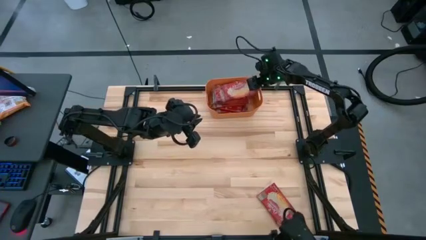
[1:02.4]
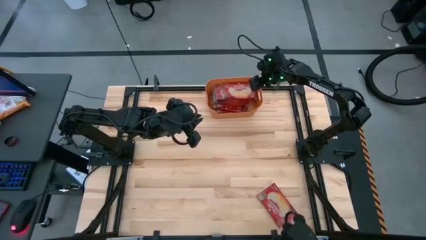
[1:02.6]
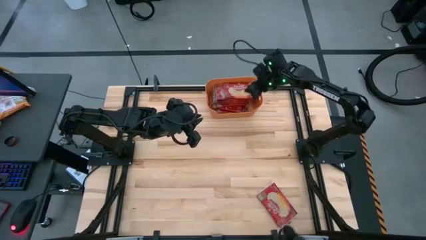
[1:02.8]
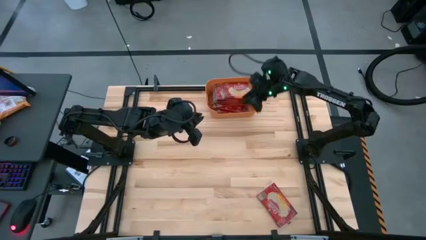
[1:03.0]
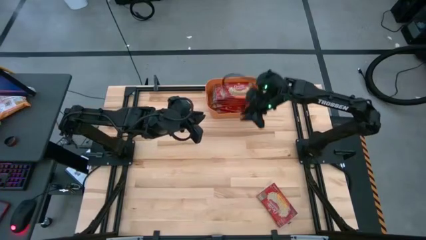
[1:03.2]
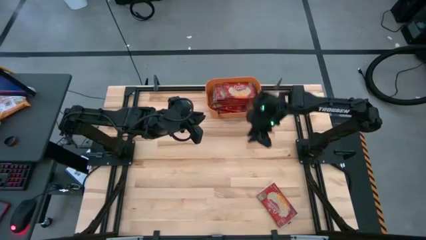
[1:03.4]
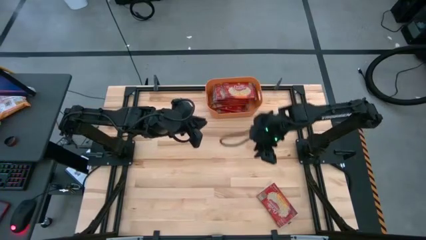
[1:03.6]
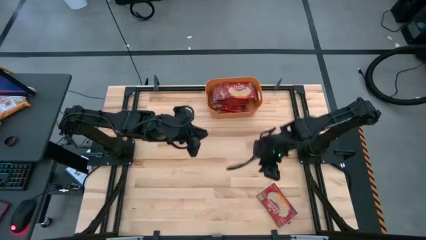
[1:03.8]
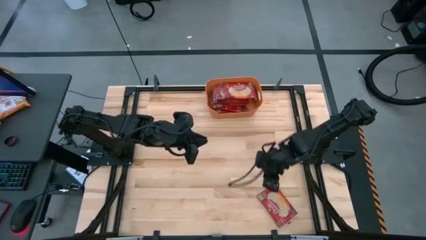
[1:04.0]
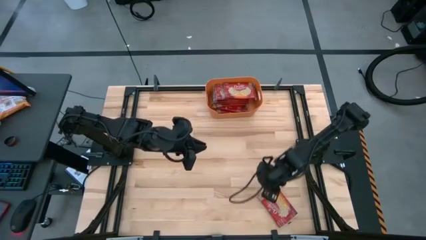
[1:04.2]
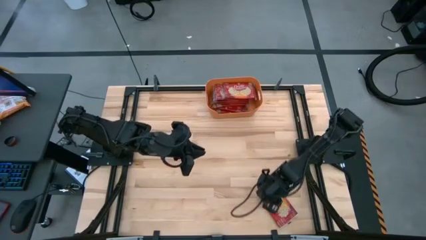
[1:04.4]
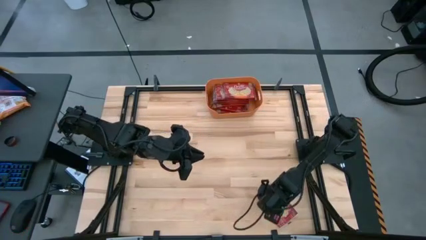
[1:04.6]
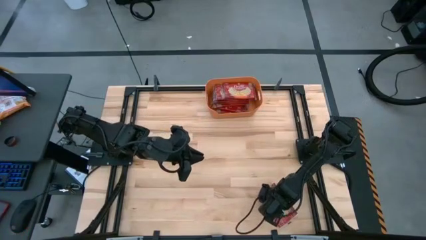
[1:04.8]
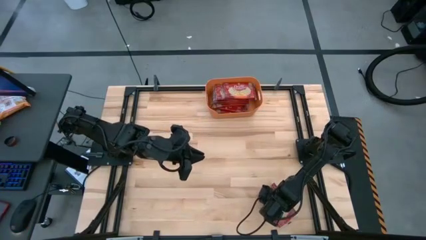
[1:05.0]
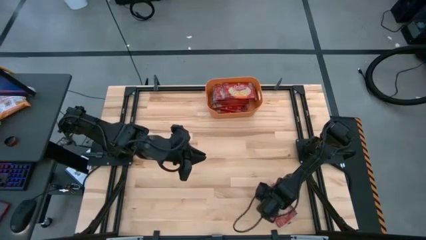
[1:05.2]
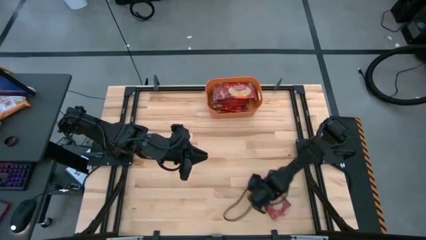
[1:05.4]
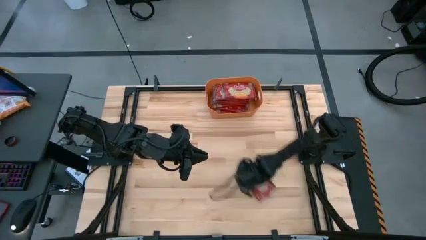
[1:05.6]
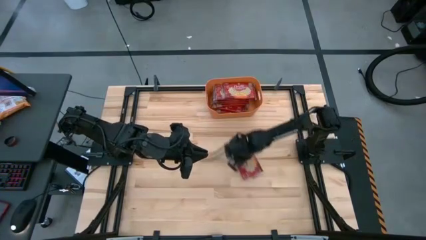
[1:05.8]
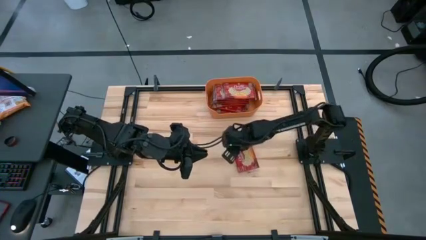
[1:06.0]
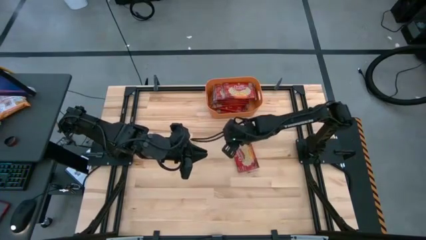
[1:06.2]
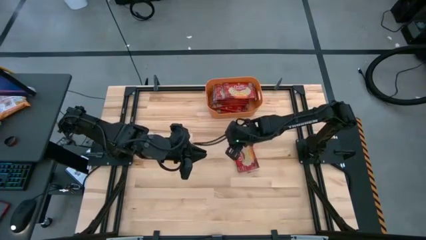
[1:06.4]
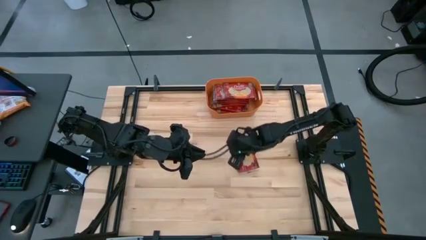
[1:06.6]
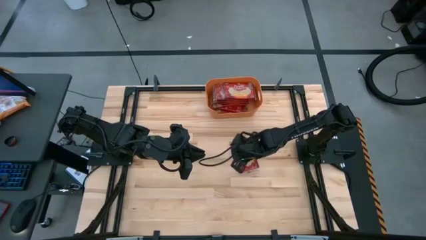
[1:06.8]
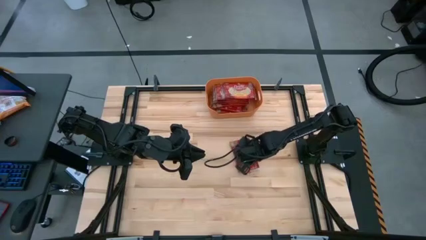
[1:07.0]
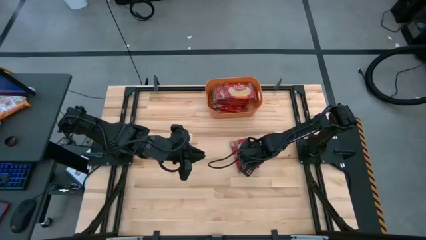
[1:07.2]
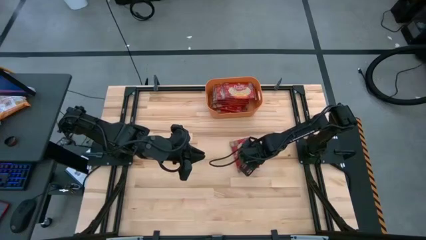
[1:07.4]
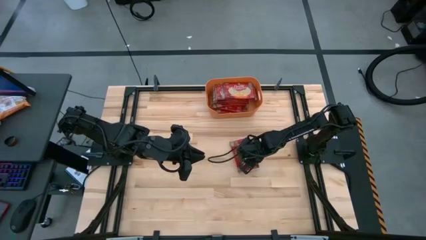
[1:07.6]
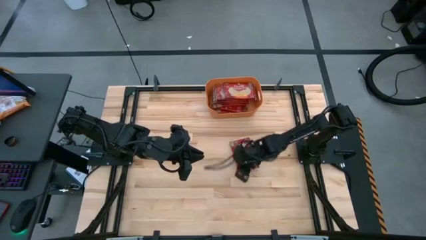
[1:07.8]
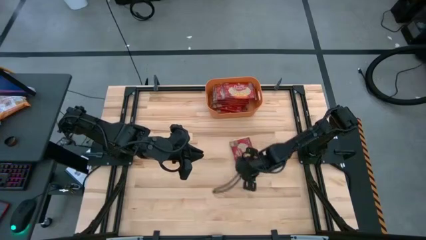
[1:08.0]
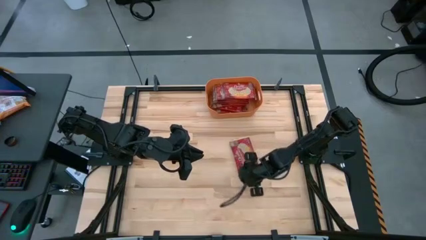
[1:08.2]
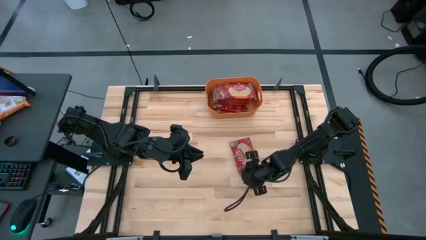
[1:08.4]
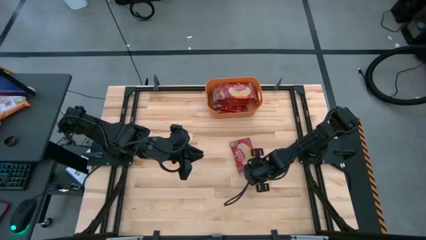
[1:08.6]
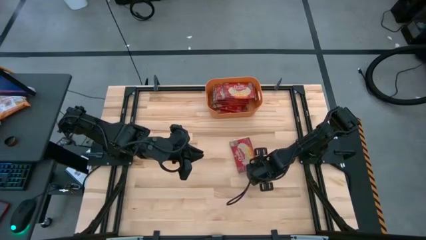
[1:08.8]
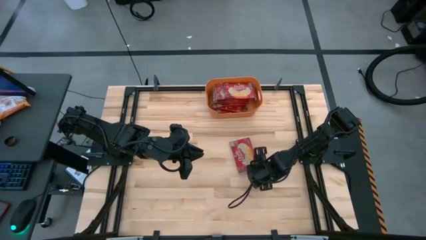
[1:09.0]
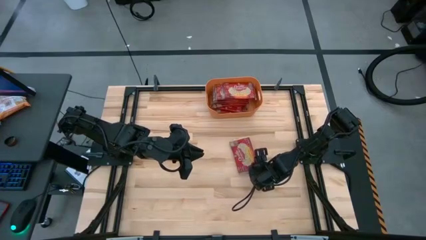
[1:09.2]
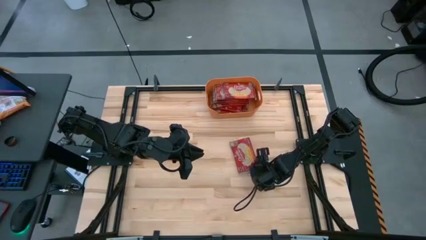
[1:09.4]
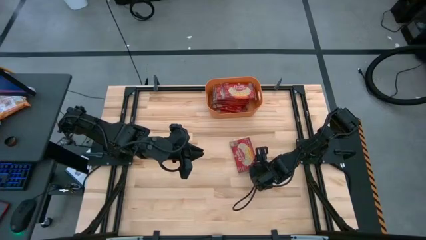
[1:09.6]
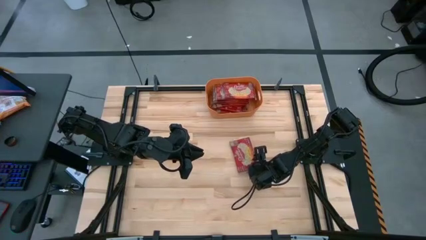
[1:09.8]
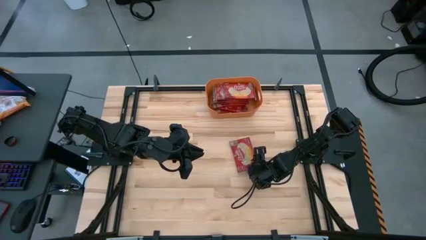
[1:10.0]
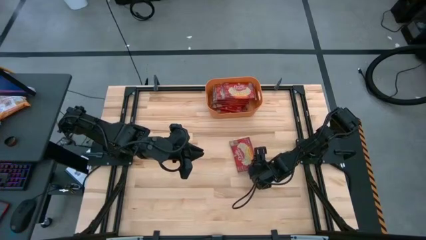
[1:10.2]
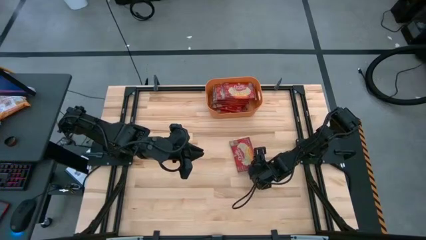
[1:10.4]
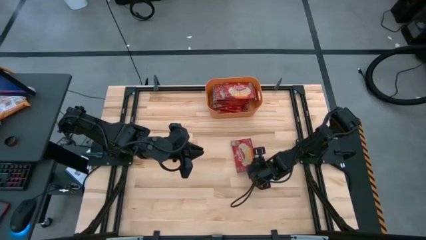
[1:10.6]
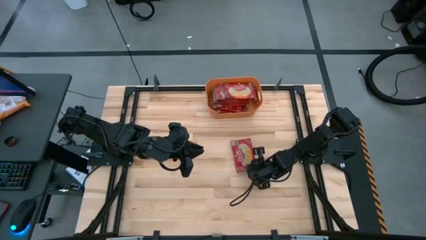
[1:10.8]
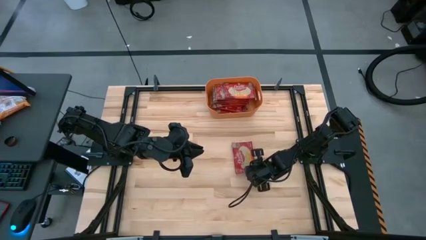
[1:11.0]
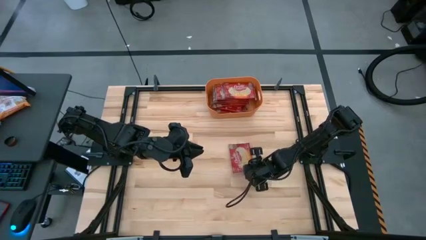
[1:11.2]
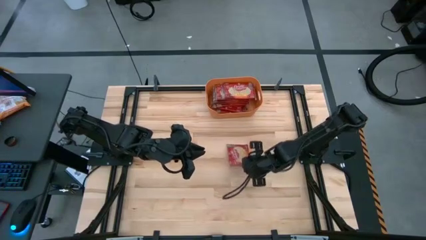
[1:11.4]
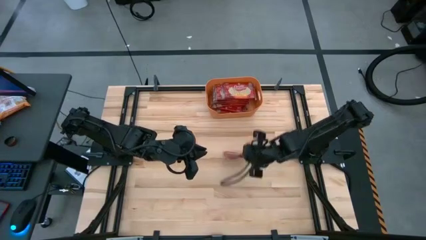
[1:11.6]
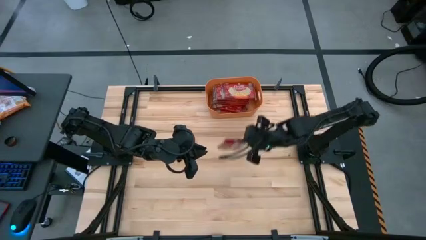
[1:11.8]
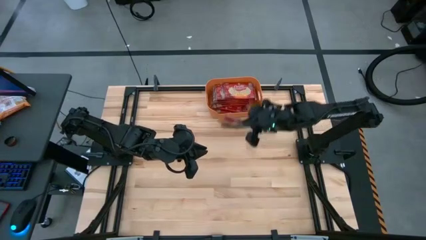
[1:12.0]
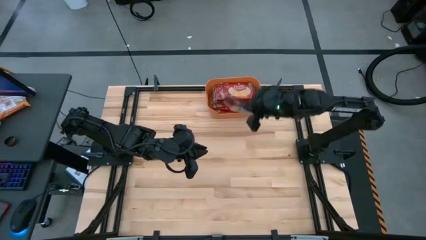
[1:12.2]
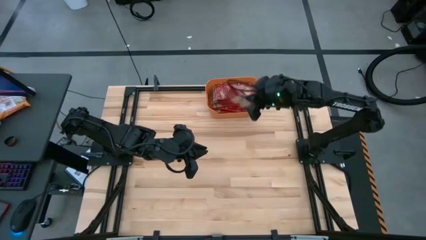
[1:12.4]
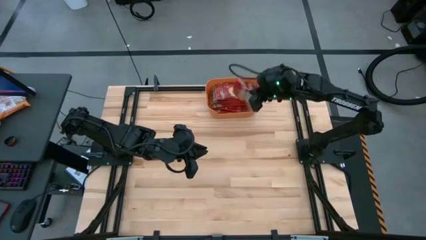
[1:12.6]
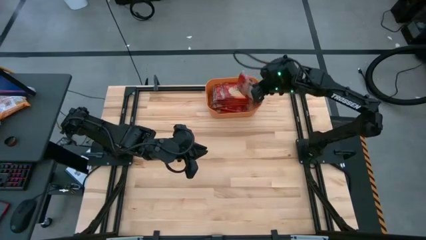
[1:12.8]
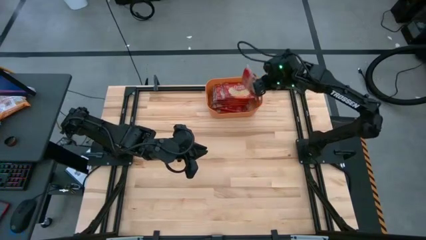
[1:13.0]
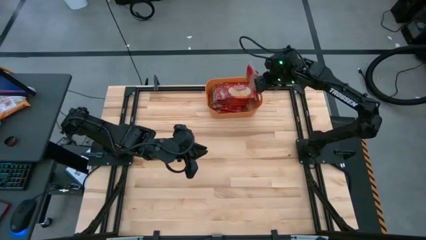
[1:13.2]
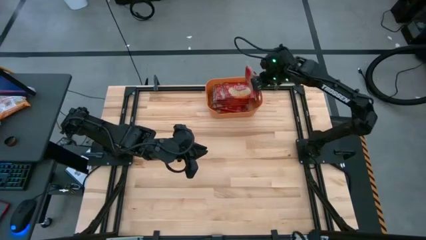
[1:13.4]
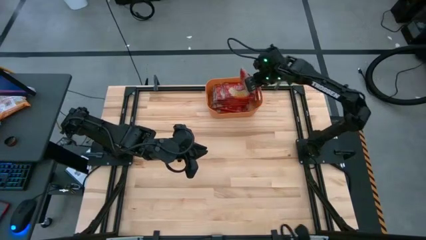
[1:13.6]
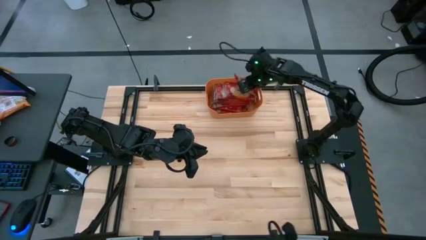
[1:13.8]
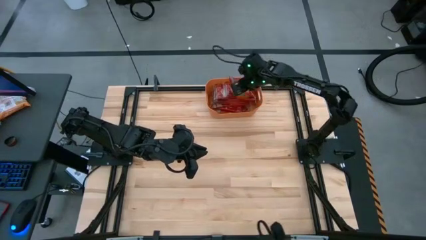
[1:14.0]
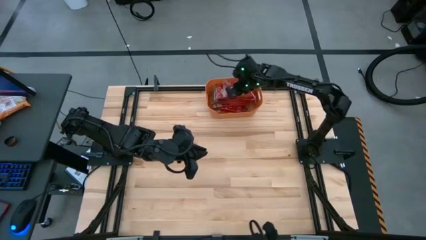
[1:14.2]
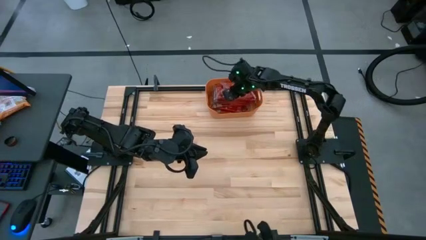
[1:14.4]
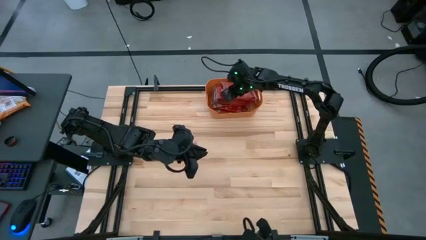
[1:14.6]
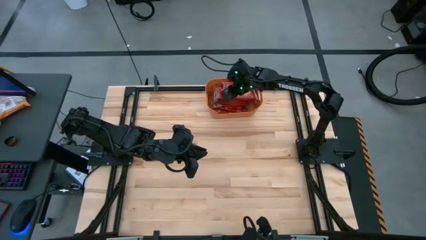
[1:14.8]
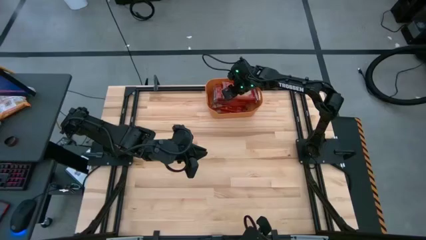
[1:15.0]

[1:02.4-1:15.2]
Task: Sort popcorn bags into baskets
Put the popcorn pack into the orange bin

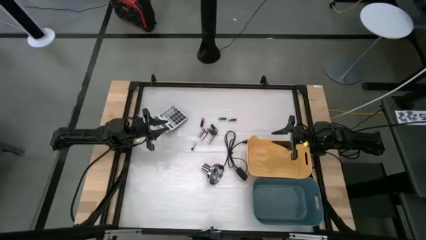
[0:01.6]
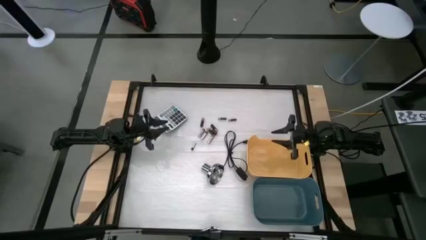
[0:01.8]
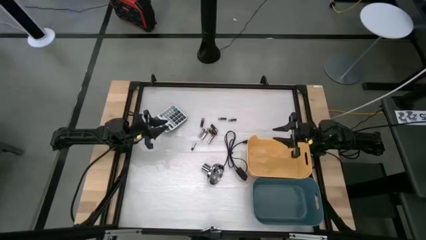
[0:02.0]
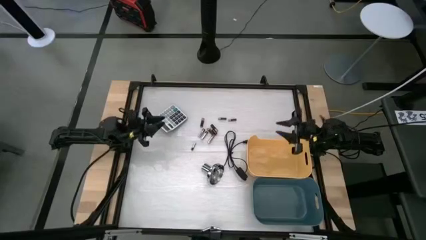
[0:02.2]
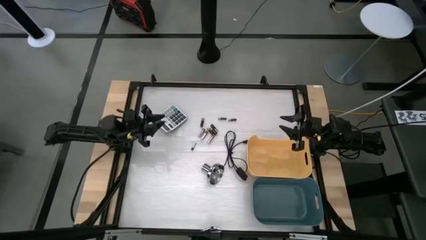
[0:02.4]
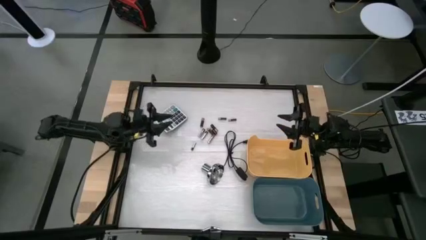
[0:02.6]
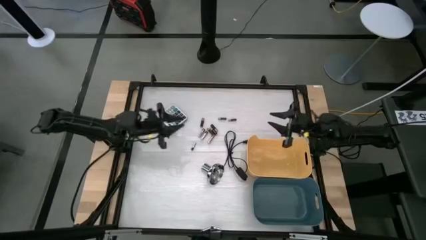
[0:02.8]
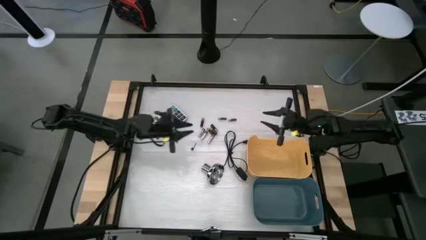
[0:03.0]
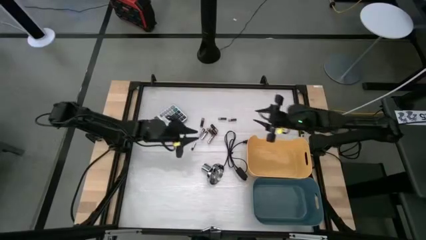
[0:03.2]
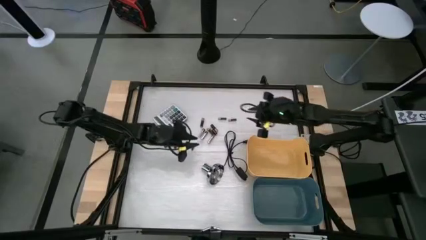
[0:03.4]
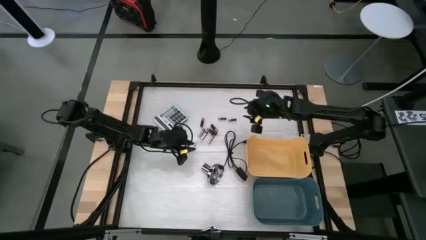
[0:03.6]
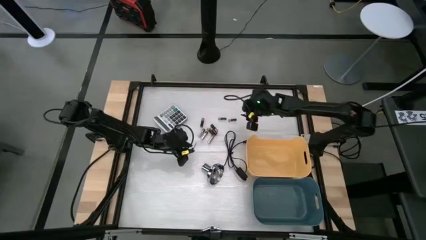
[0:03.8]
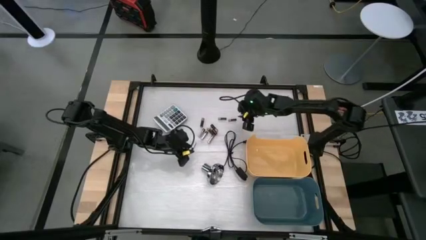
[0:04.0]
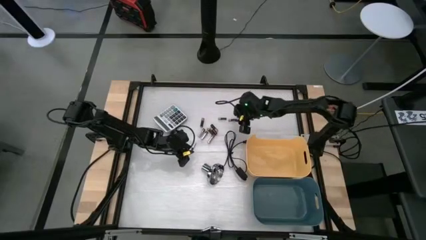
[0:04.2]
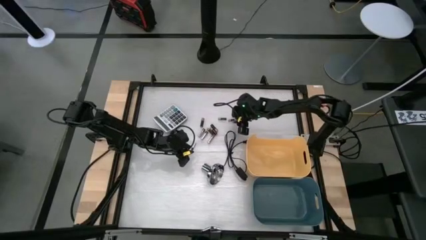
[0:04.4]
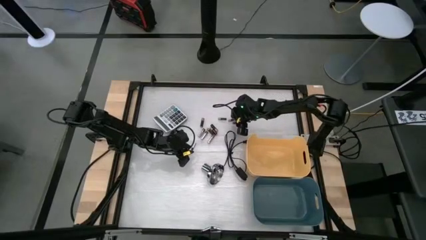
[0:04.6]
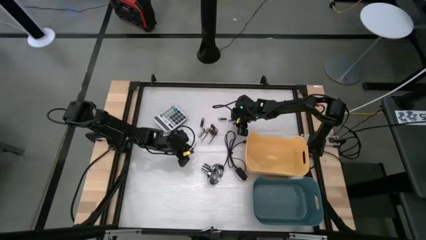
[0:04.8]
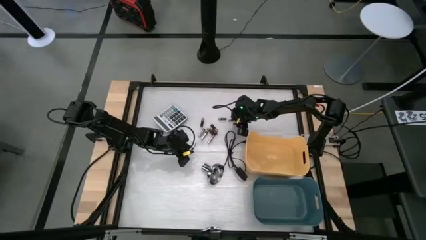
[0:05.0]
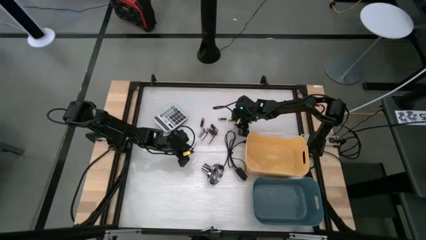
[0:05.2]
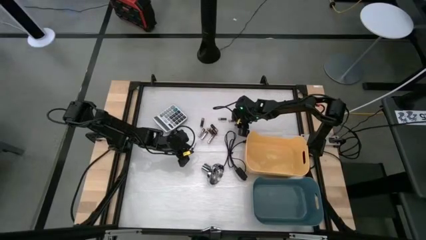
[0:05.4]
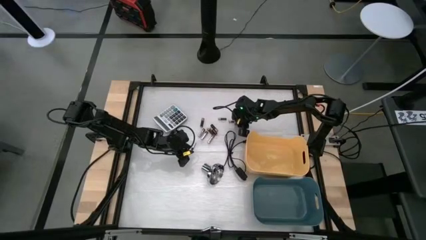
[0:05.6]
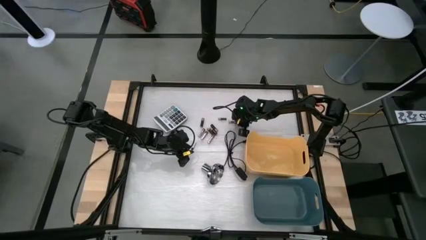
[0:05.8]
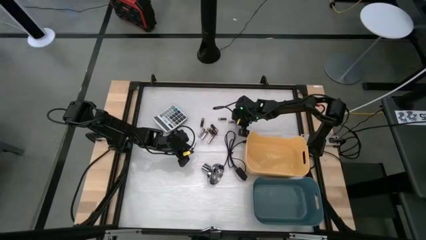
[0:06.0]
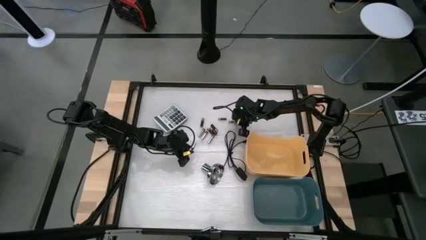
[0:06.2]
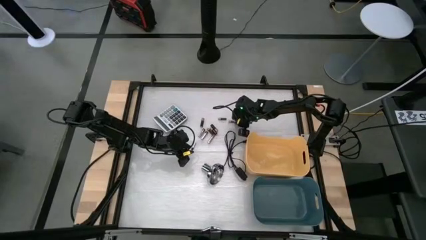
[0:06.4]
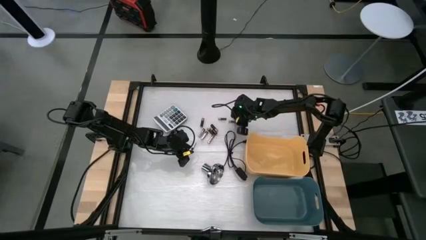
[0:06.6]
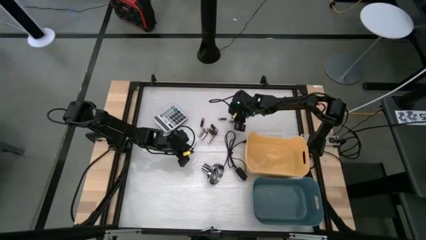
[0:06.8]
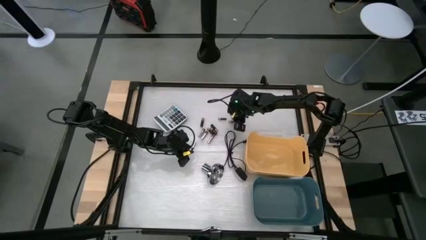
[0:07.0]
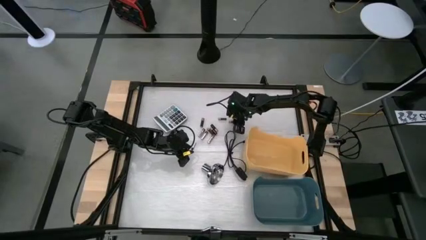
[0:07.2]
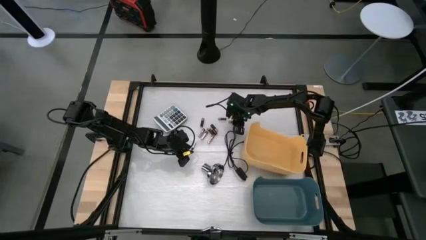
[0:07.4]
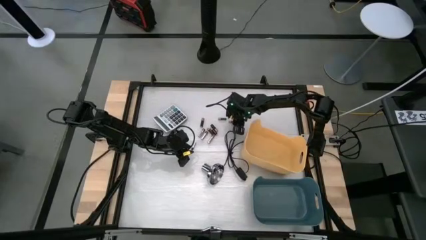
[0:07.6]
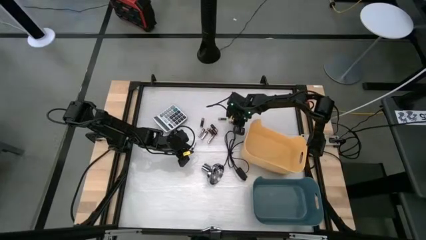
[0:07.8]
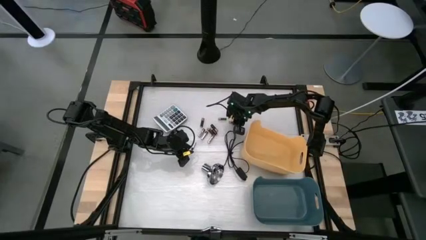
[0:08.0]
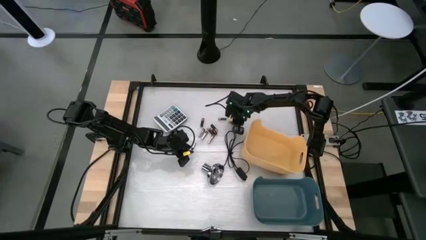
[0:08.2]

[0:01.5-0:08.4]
Task: Sort batteries
Put the black battery into the yellow bin
